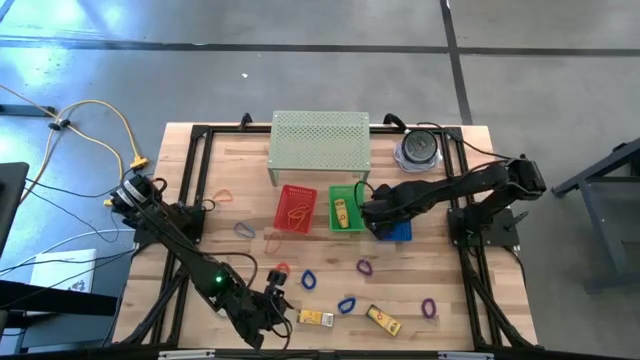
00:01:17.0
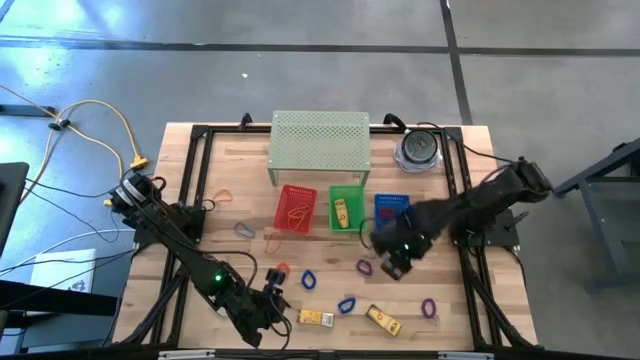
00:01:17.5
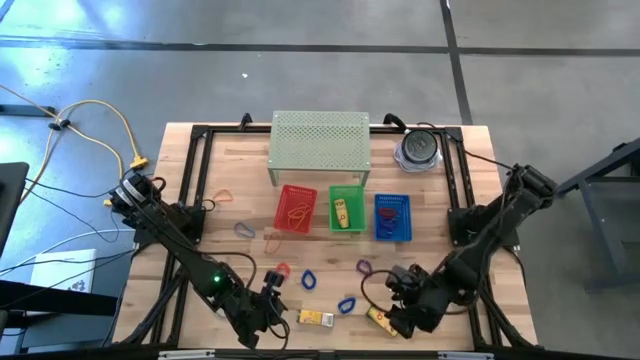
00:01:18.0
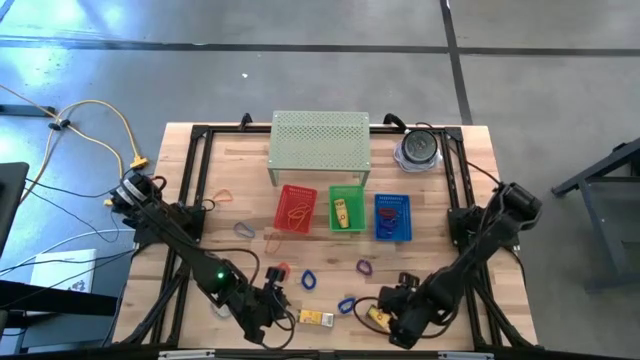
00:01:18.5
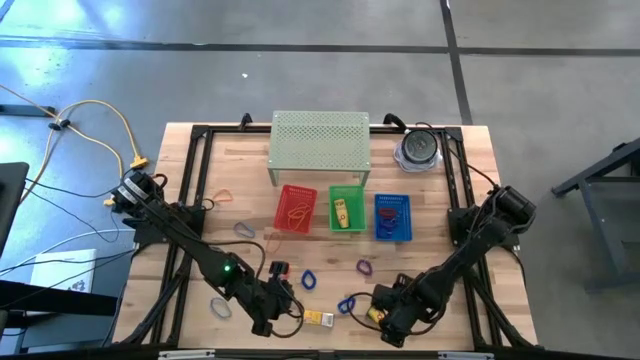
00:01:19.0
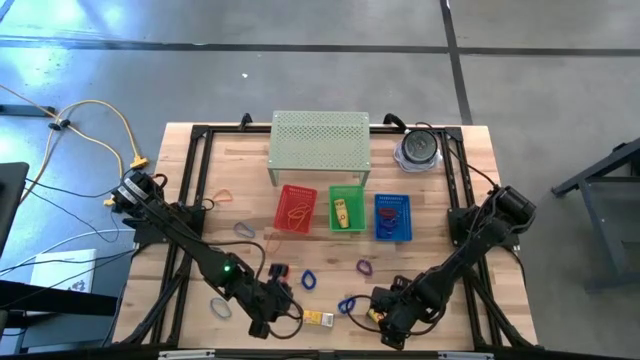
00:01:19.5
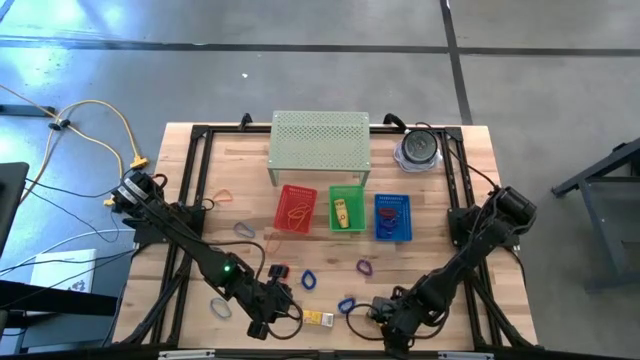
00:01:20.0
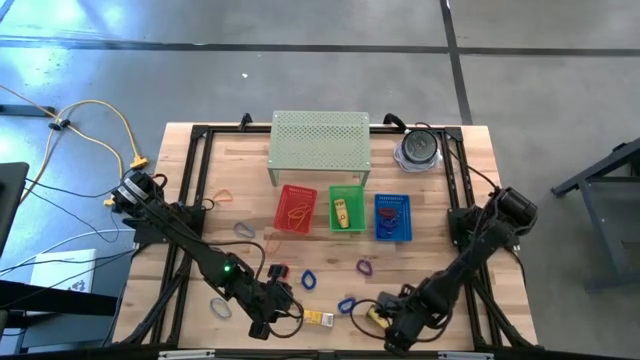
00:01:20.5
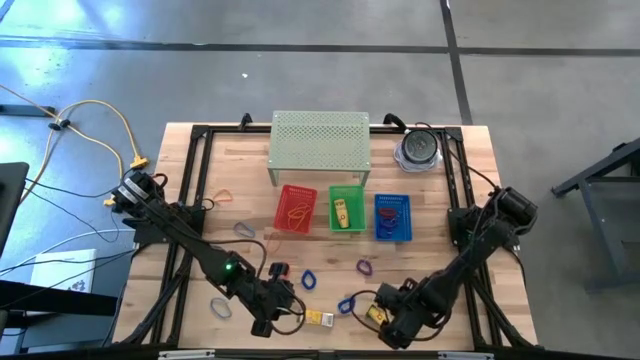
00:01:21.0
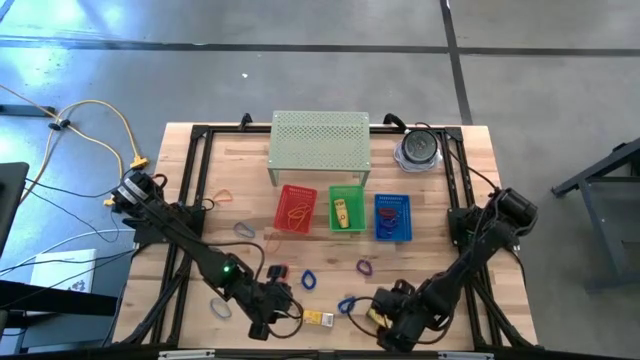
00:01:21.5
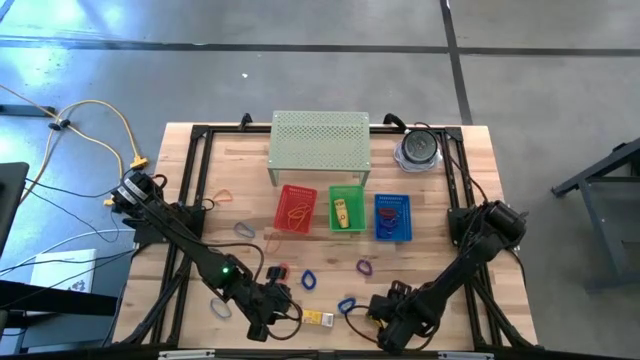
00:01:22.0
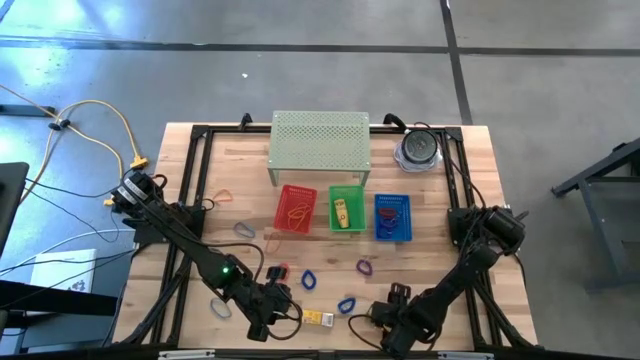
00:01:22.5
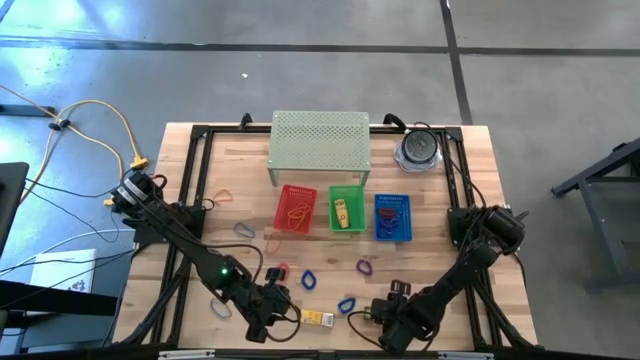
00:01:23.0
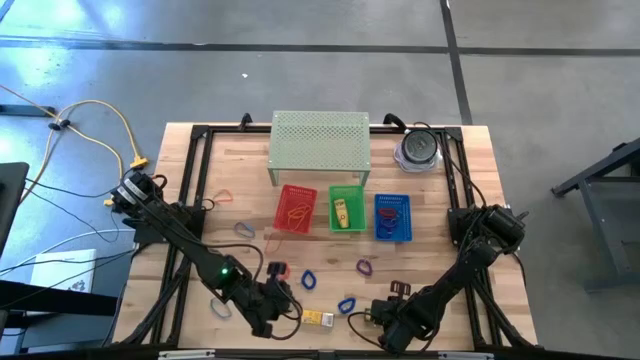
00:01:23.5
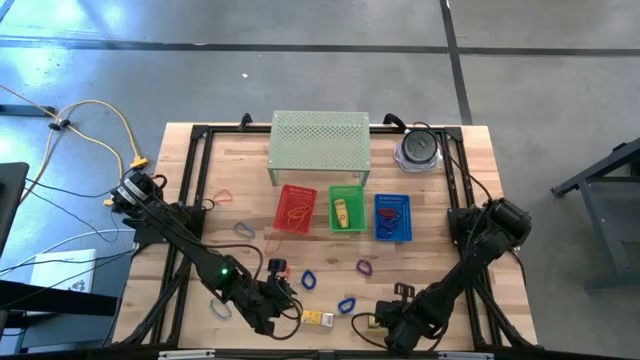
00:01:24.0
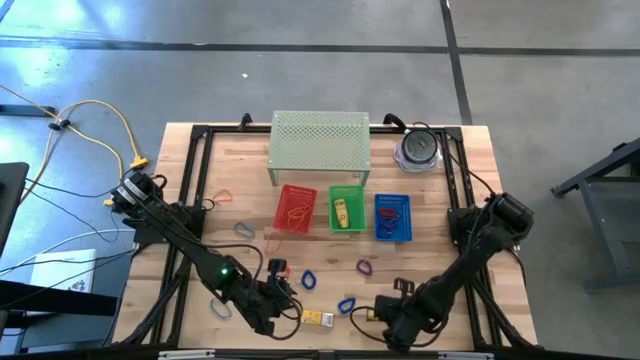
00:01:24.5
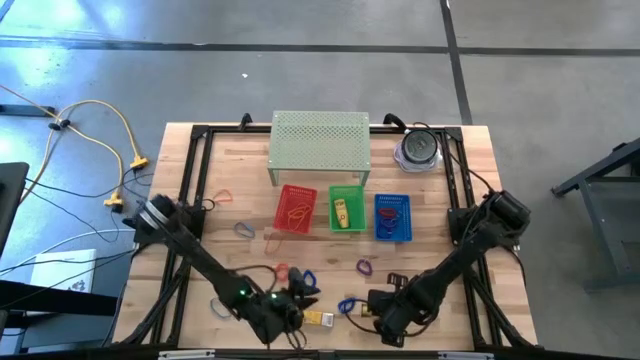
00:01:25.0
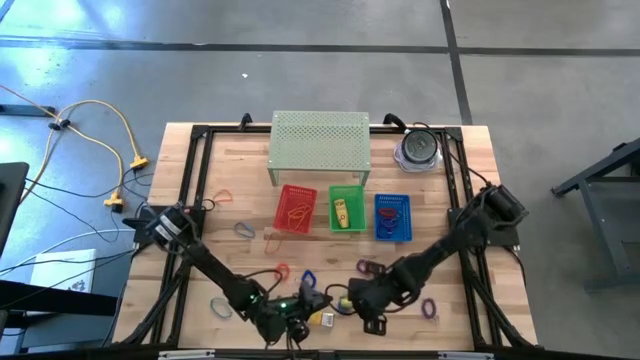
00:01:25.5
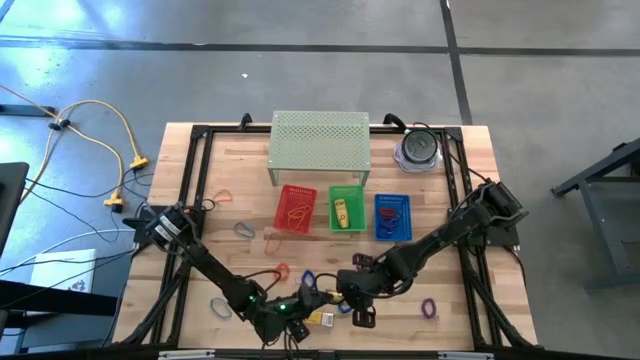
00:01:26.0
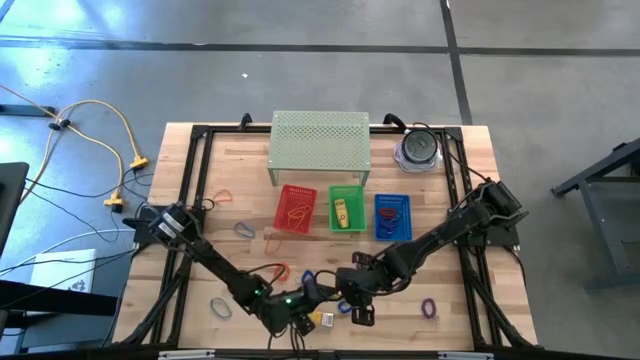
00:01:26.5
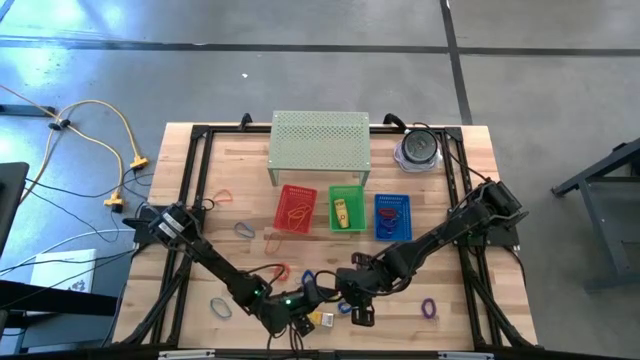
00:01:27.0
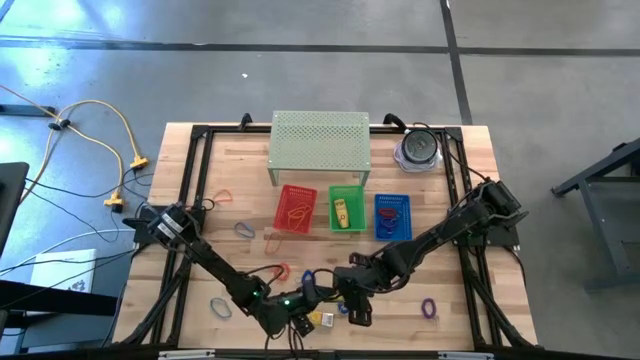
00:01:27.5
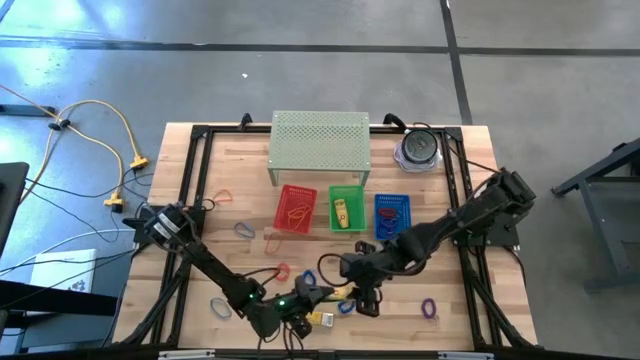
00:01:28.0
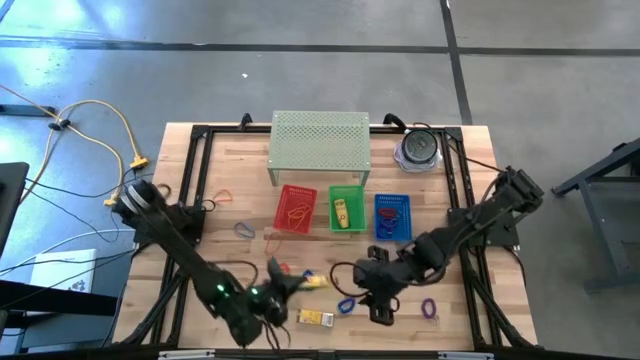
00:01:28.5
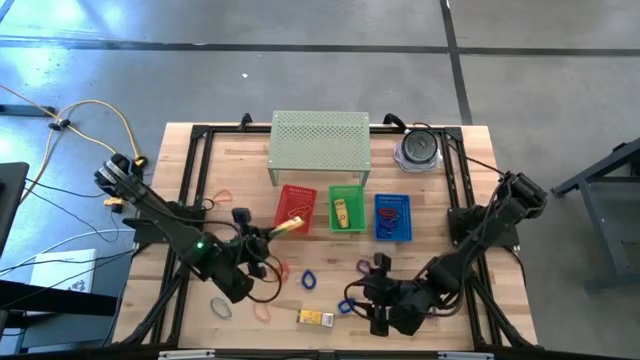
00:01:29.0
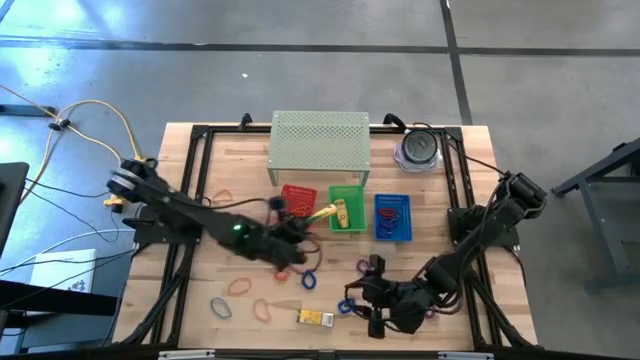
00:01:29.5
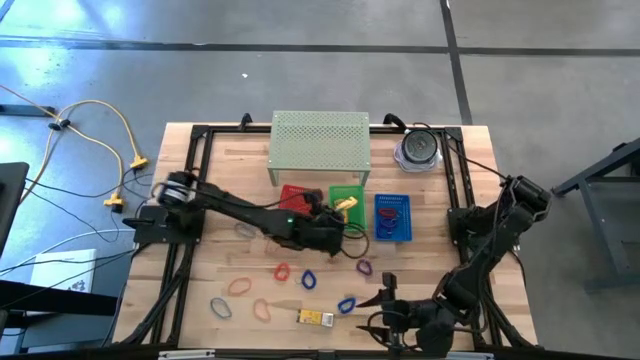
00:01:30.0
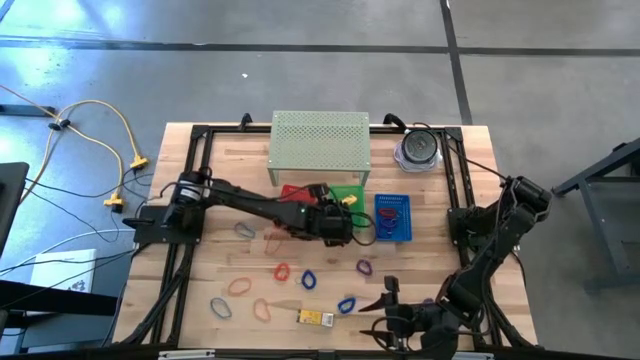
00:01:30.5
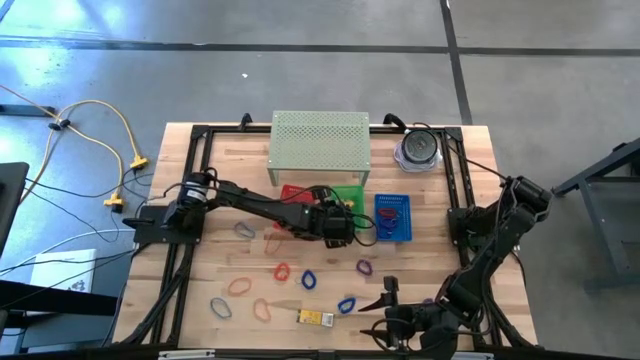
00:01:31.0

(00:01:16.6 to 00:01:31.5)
Task: Pick & Place Office Desk Supplies
Put the right yellow crayon box into the green bin

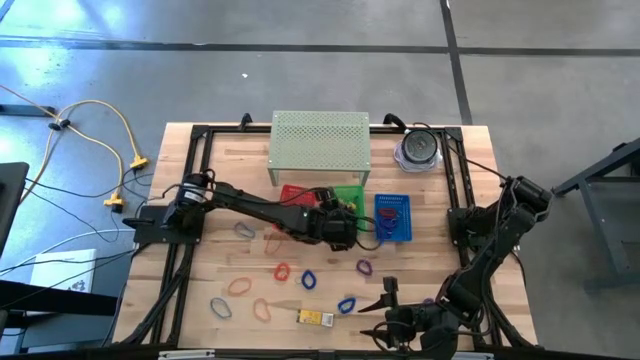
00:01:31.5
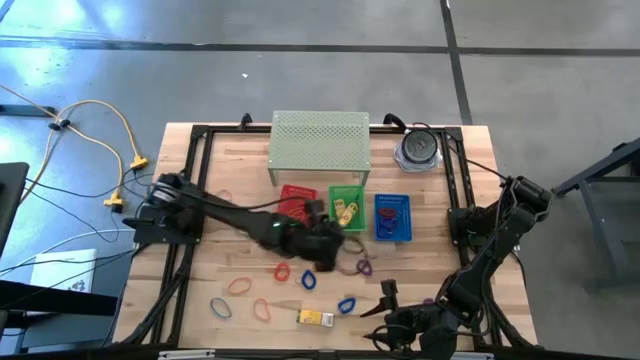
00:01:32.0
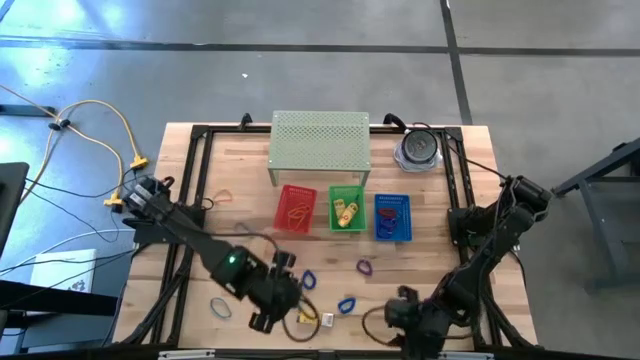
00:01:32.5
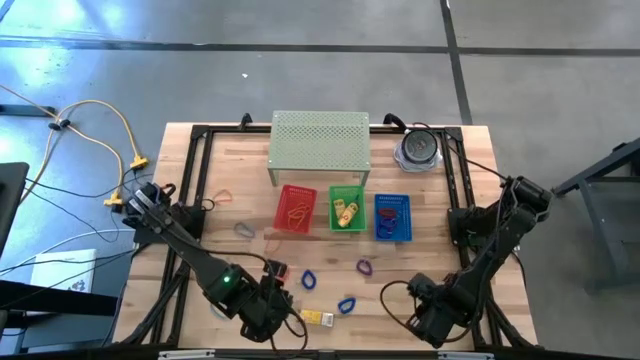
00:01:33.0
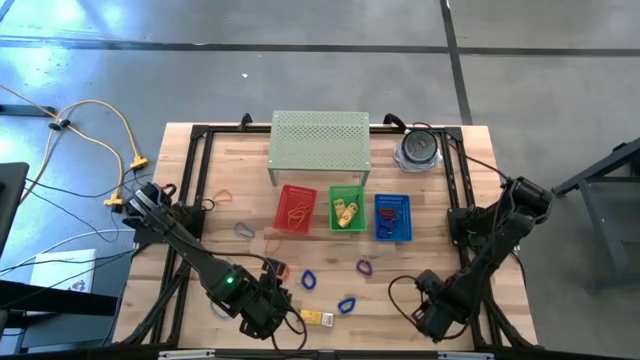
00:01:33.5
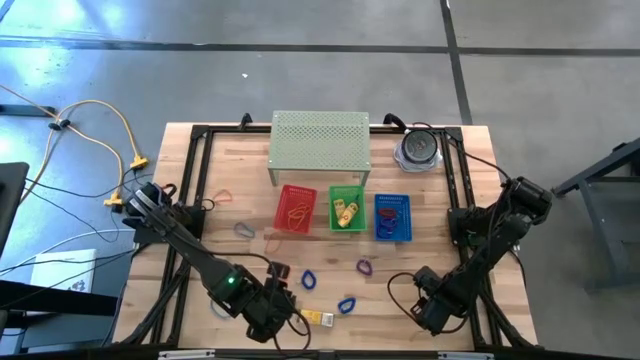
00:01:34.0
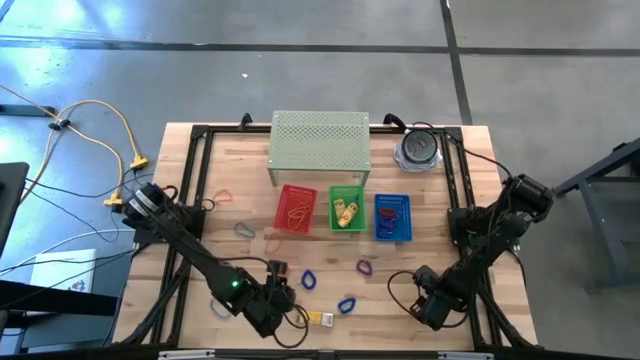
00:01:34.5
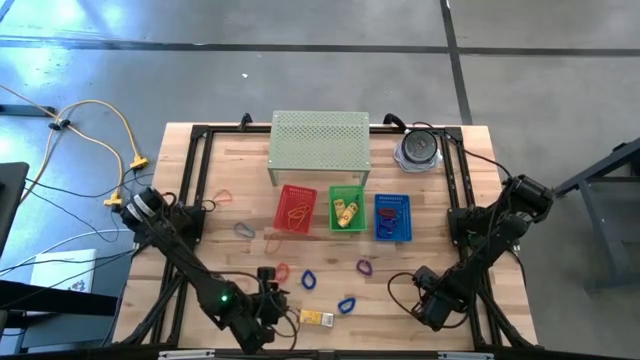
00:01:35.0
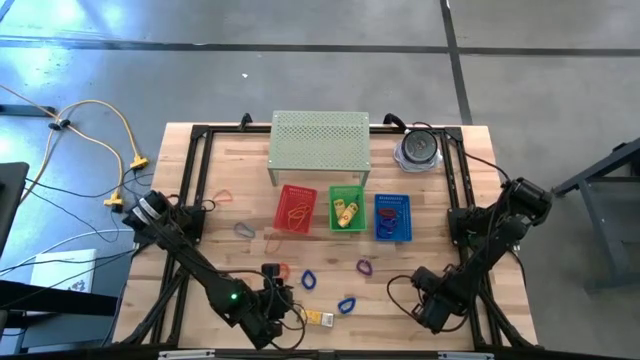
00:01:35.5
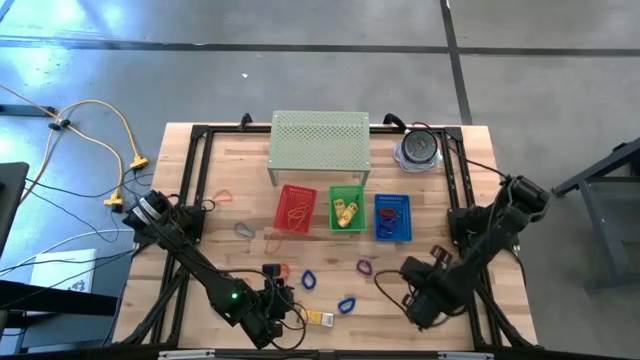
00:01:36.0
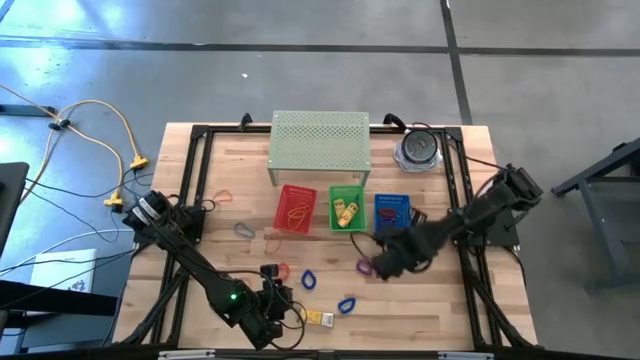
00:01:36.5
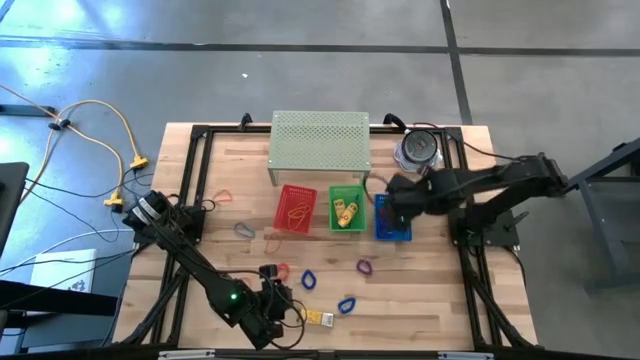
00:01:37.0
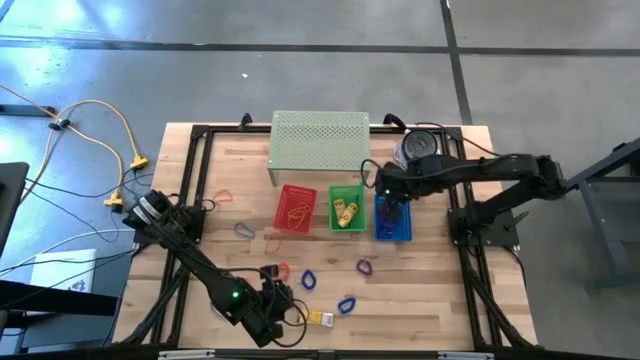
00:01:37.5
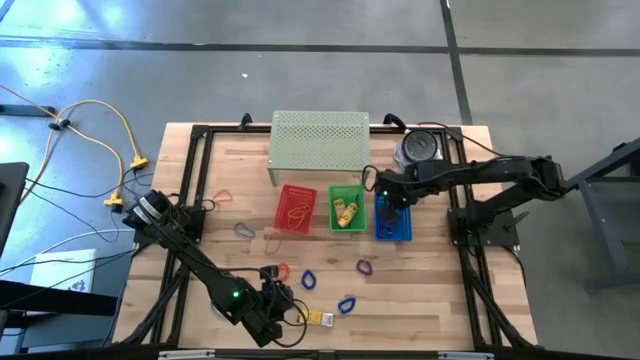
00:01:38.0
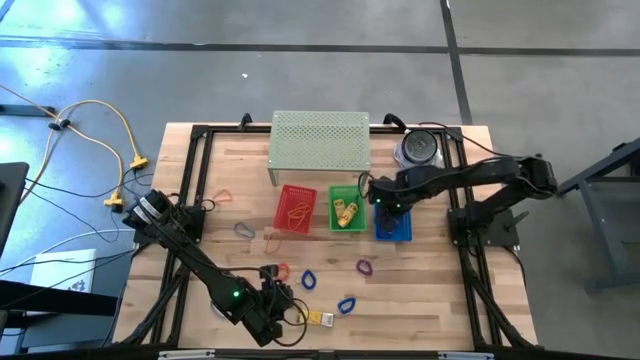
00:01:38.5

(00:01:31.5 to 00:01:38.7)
Put the right purple spring keychain into the blue bin
